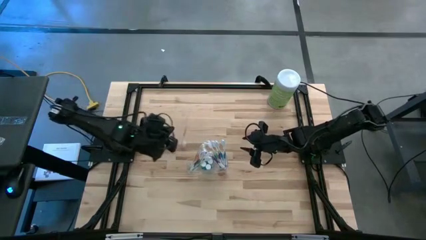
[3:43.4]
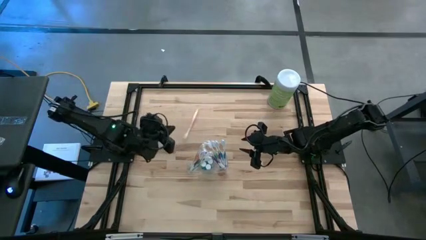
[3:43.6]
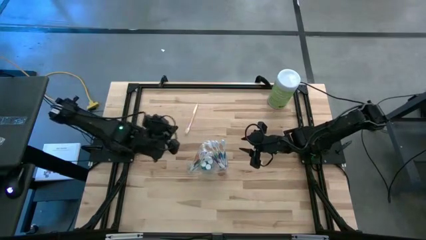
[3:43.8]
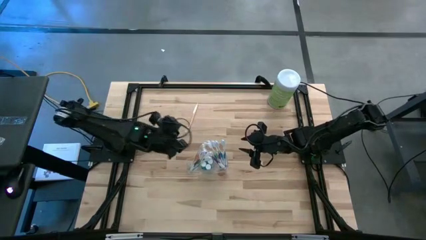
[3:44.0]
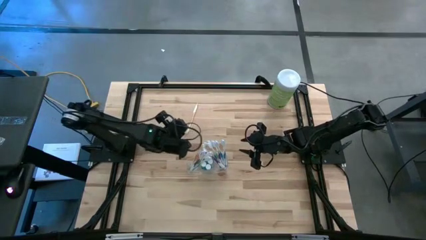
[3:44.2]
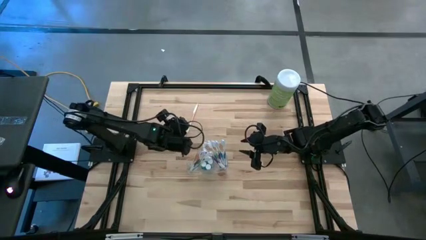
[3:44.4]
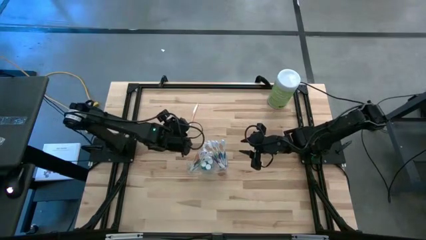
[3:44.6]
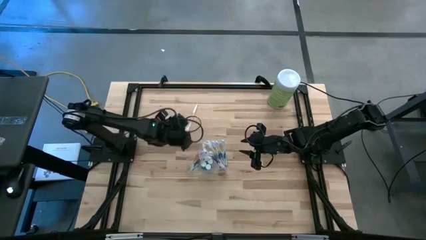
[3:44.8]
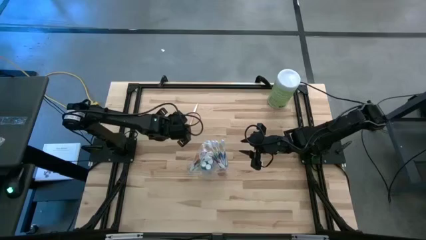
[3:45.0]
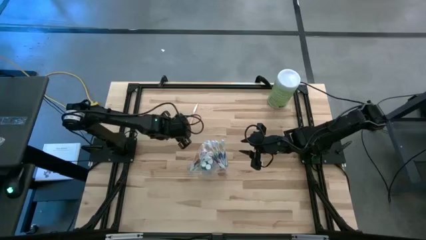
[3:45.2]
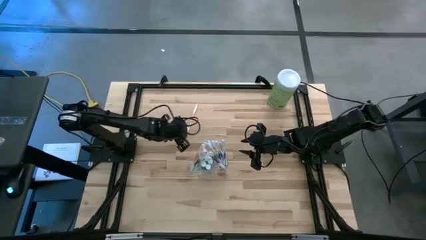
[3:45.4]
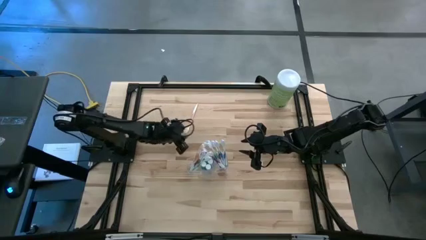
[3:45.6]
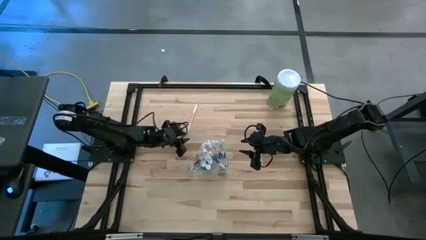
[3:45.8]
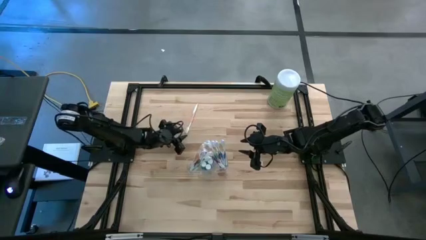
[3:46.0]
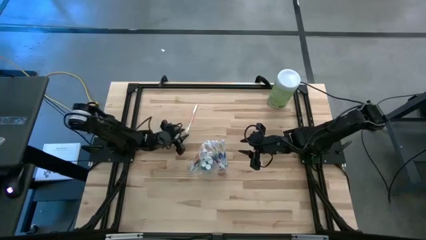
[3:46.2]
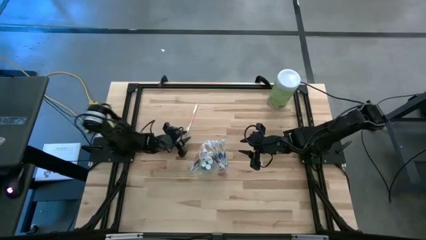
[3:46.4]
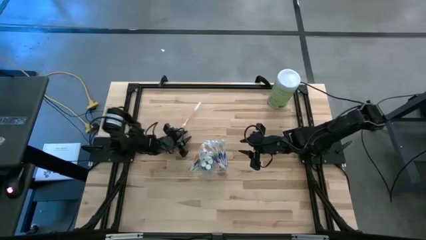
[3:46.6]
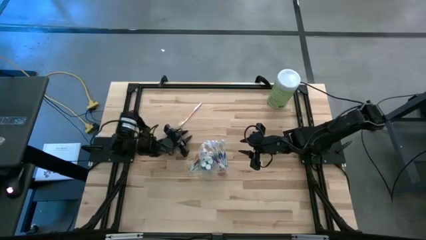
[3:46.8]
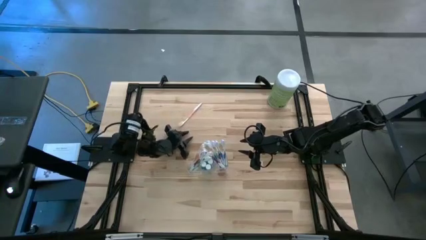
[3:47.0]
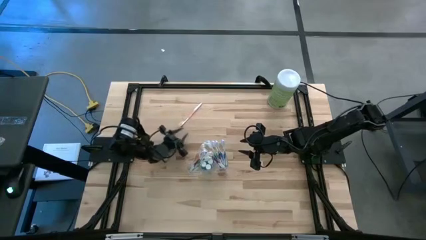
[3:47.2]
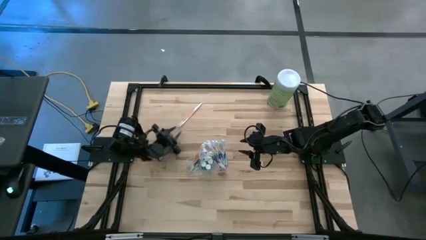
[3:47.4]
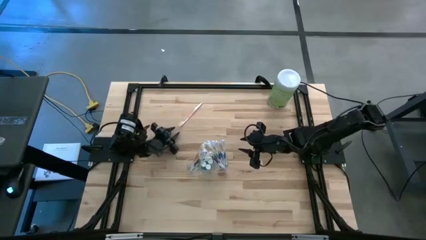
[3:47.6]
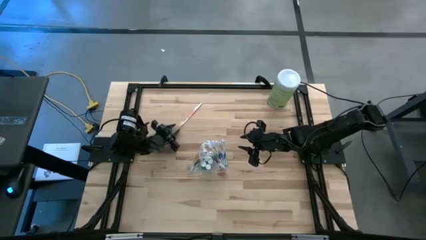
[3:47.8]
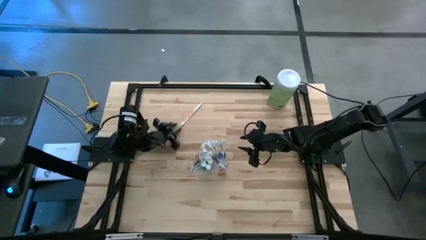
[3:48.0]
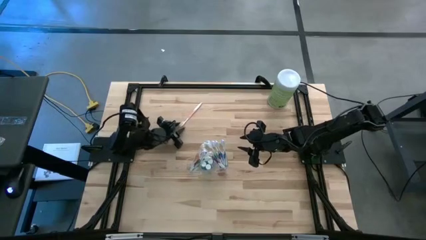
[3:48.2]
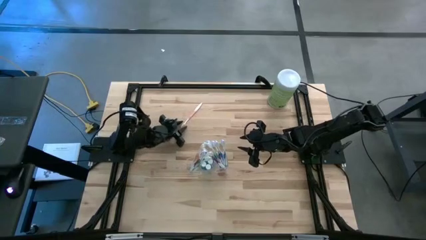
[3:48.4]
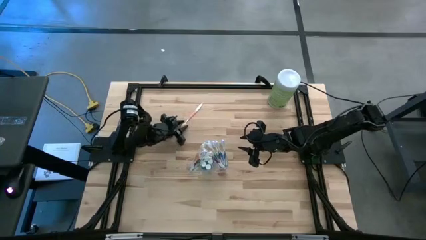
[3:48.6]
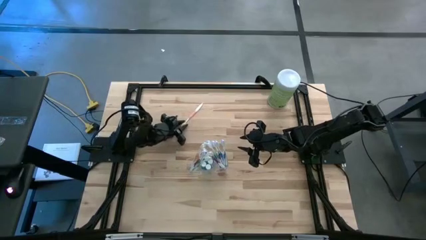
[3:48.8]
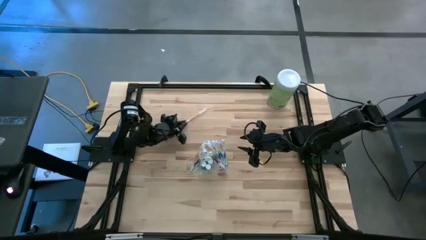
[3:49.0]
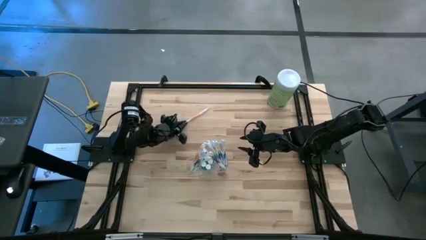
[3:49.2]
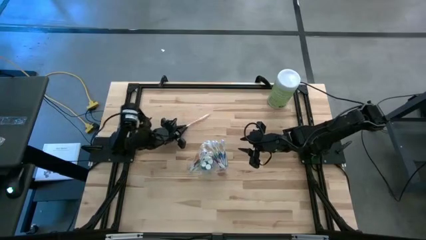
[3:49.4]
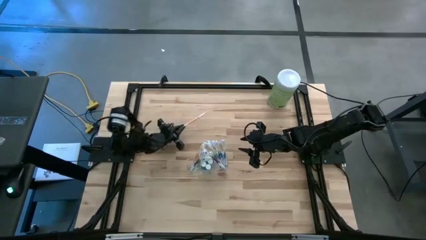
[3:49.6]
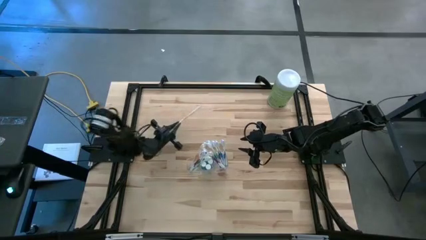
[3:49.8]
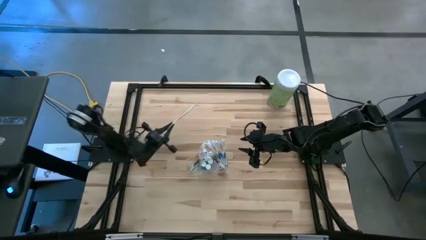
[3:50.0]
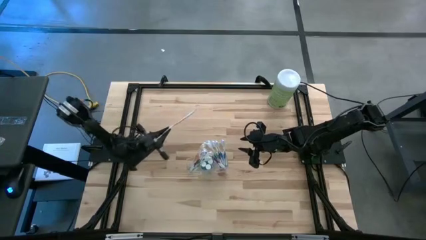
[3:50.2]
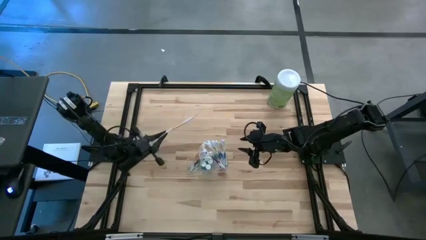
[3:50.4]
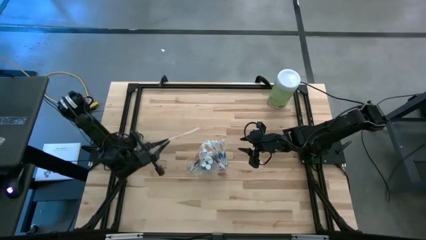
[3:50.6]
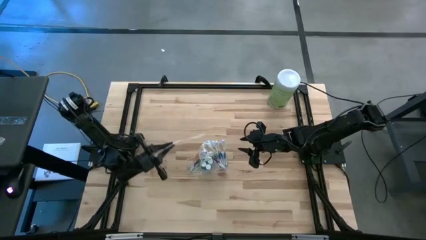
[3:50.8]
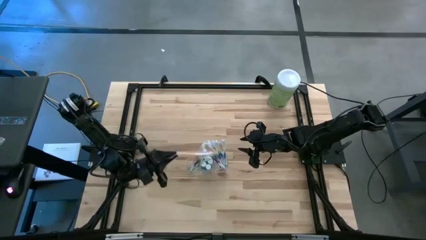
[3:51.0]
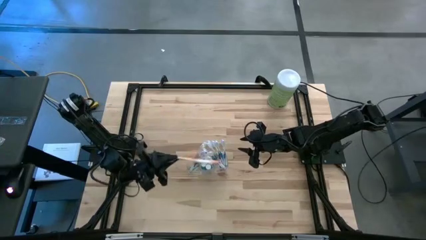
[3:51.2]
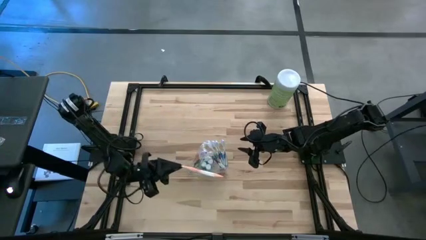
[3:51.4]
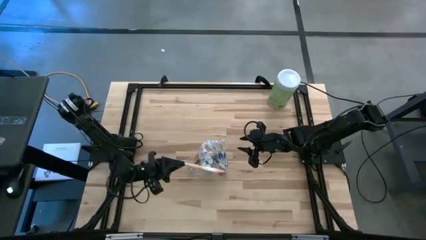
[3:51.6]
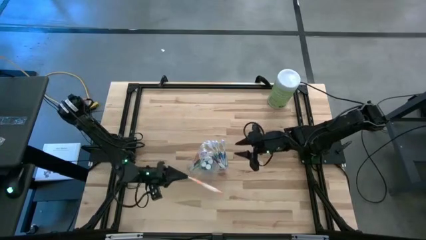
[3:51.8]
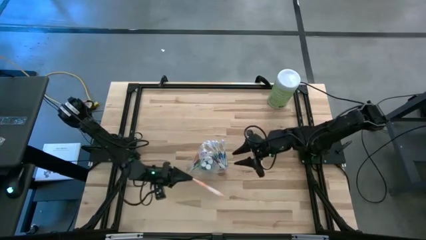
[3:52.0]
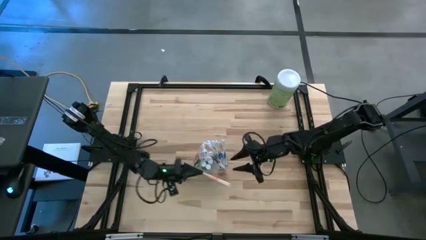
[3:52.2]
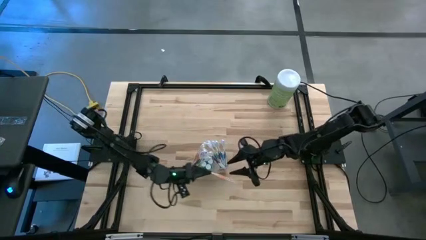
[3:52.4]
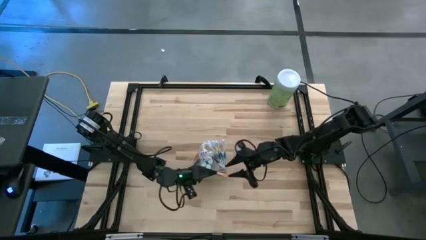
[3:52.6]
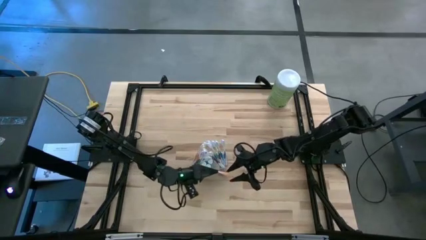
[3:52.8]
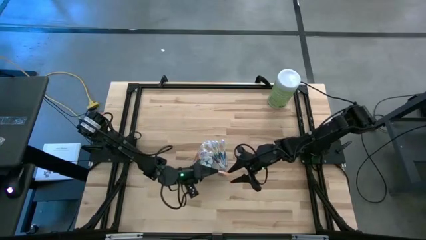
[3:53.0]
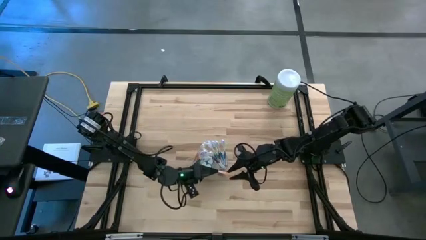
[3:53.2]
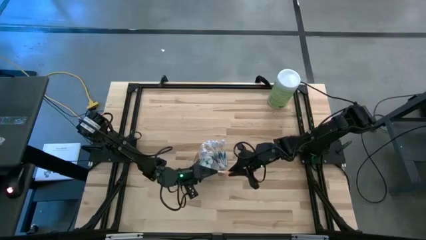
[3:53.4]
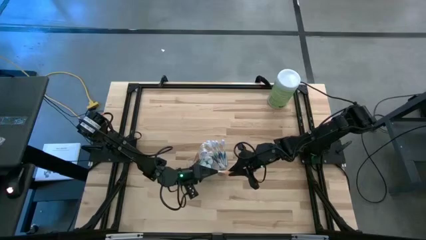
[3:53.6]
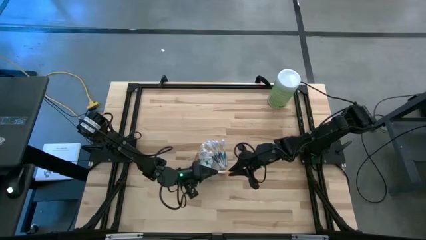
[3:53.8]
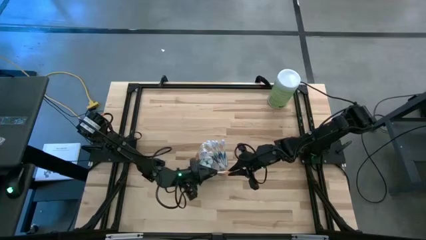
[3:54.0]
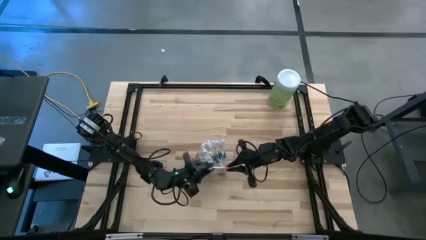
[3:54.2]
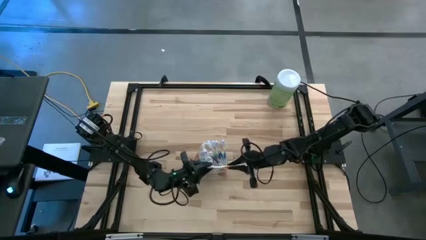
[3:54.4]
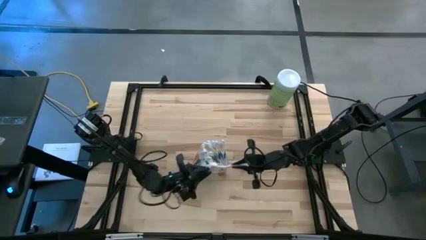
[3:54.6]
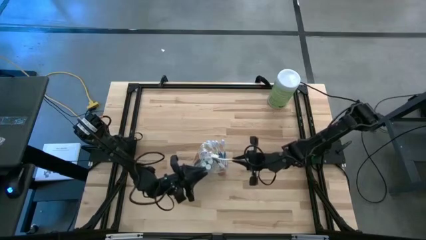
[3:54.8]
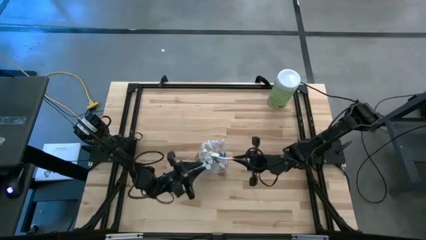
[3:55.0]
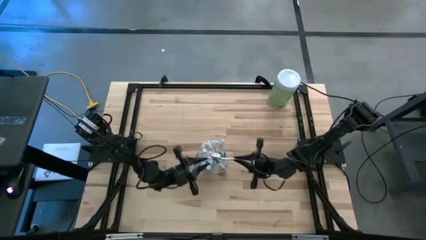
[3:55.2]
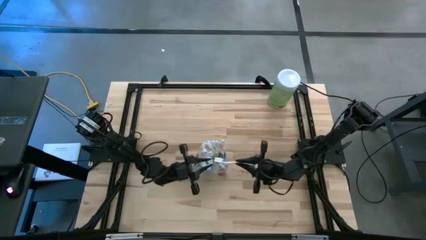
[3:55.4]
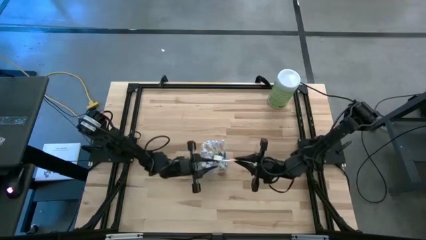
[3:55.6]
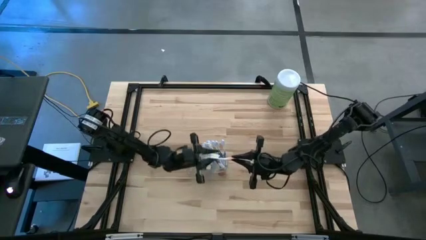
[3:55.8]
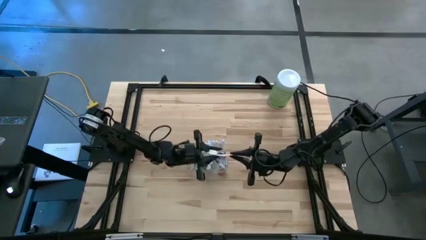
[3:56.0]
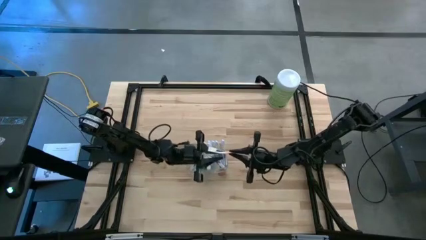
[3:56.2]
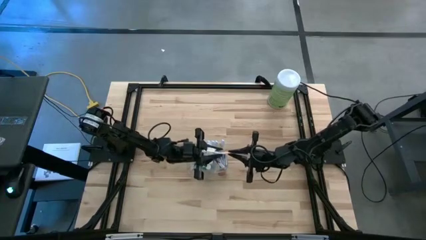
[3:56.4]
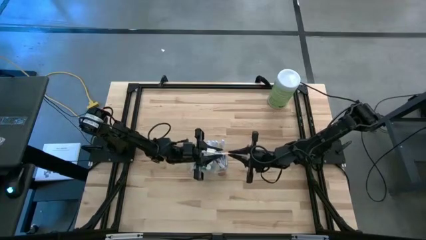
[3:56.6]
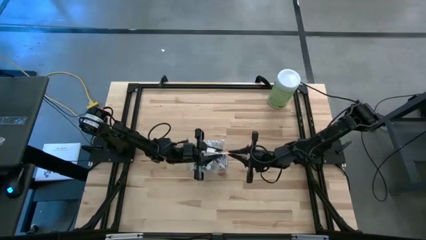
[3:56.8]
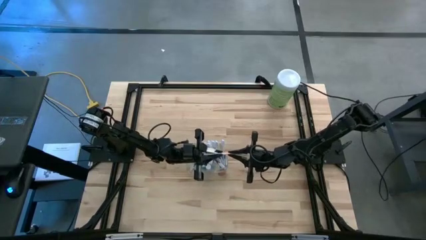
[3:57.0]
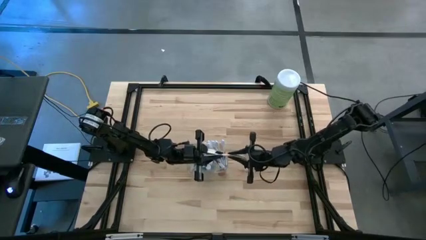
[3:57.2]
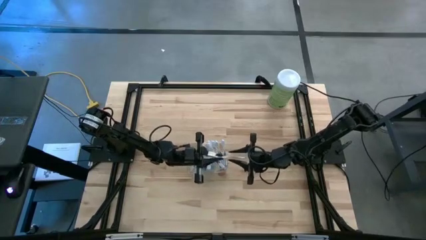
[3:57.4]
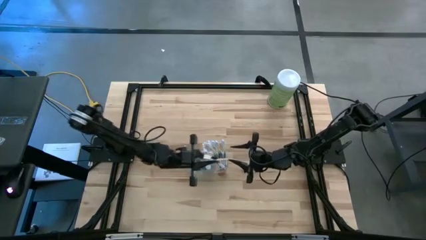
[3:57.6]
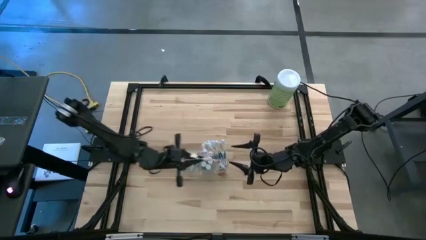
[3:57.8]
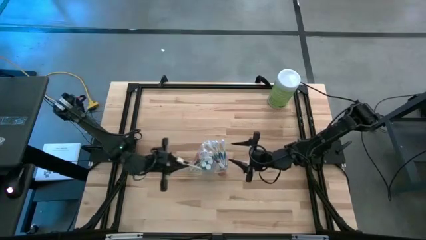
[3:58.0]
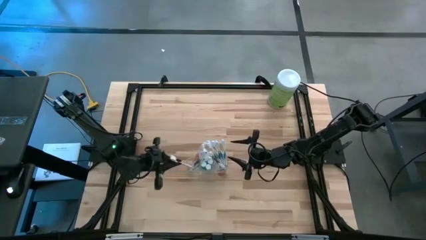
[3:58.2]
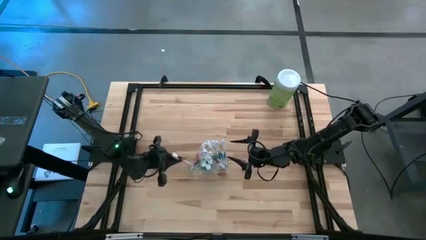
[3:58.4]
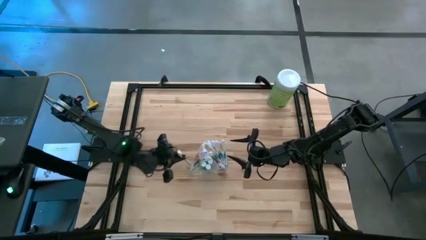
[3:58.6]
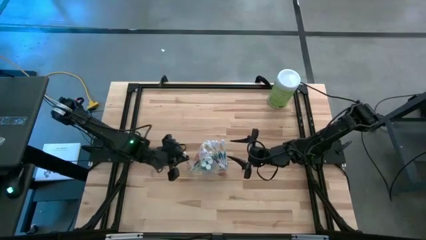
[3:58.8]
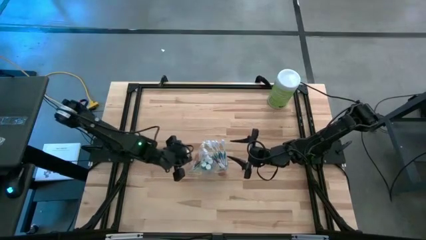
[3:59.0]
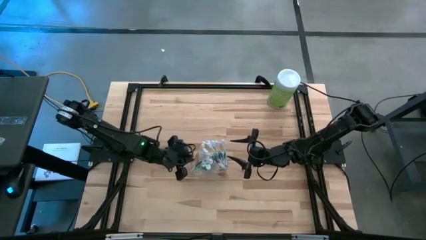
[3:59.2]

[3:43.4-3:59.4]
Task: Pick & Place toothbrushing station
Put the orange toothbrush into the transparent organizer

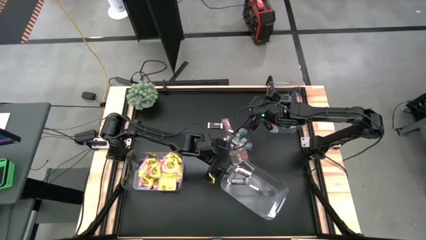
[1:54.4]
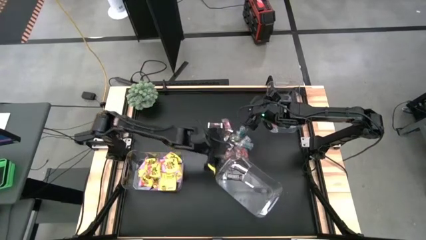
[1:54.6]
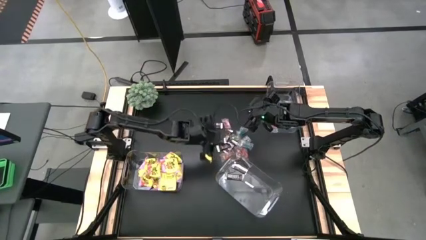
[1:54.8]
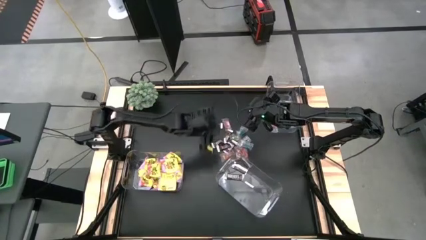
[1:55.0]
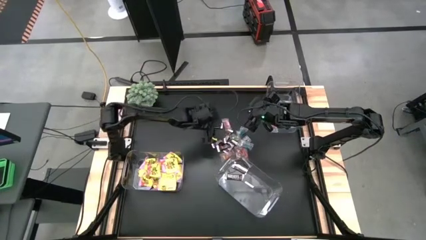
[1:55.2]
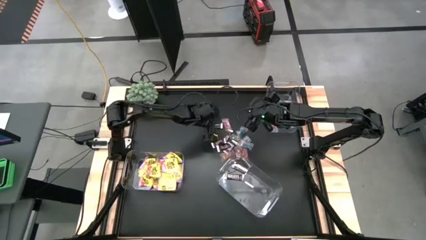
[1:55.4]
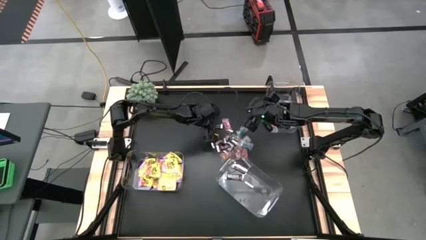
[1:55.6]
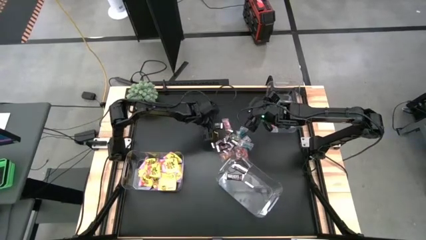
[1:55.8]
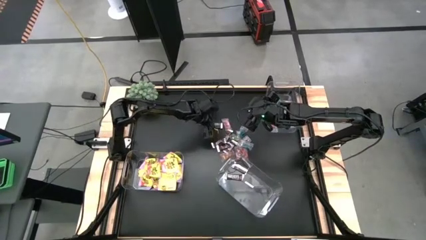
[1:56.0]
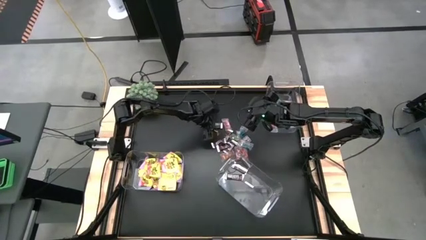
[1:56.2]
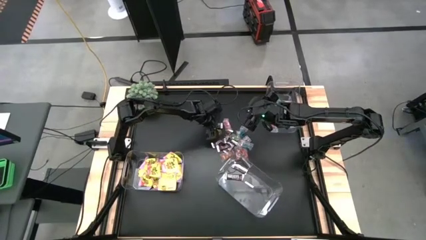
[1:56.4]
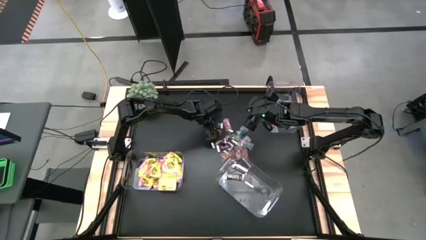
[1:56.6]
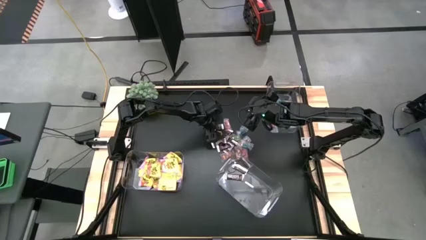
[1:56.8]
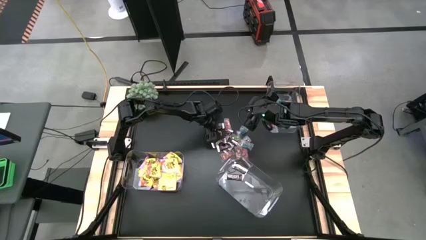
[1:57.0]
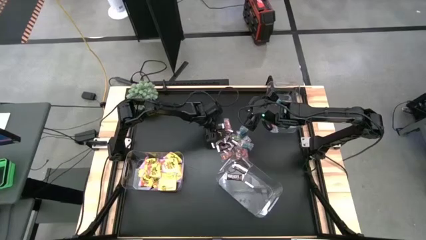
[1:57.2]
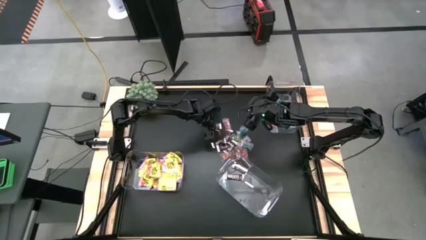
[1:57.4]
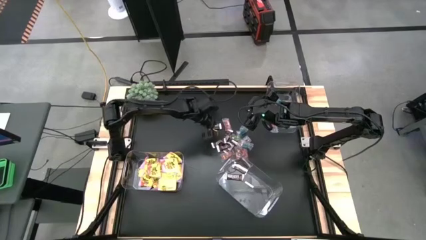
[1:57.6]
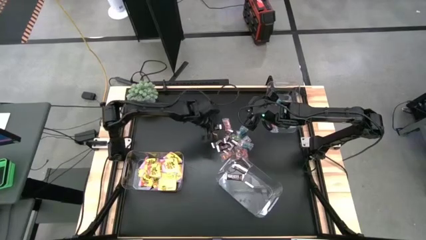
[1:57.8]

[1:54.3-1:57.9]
Task: Sort candy
Put the brown candy in the bottom right transparent container
